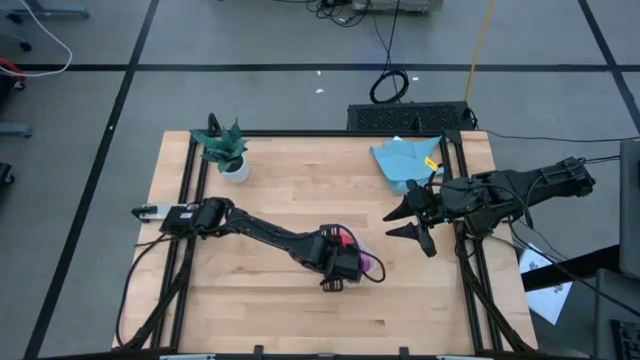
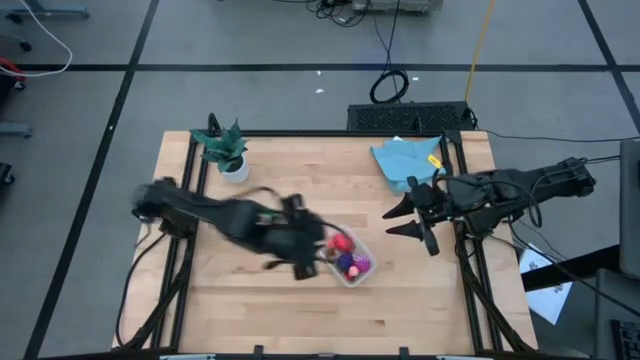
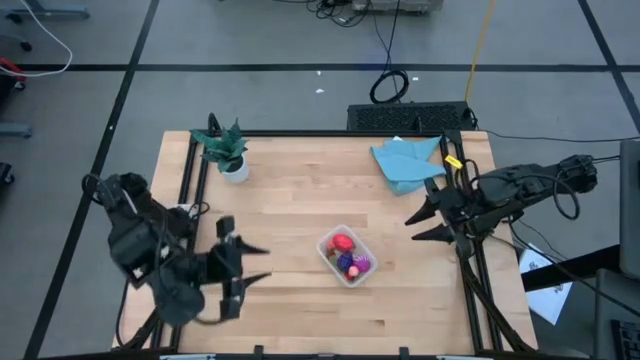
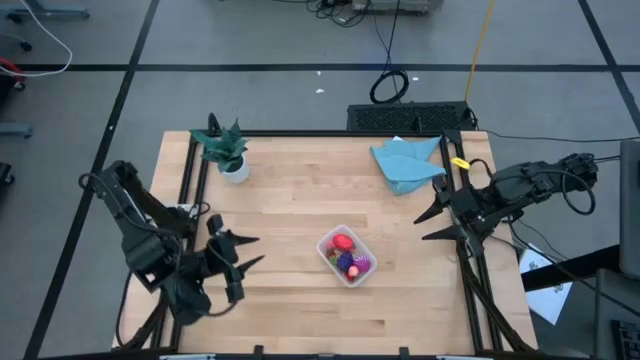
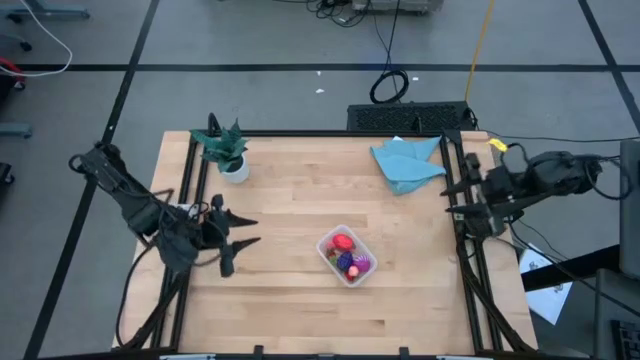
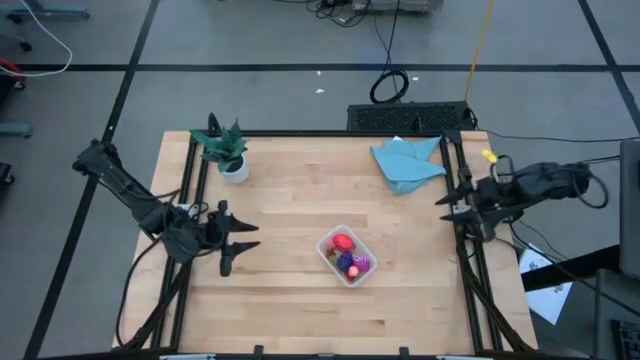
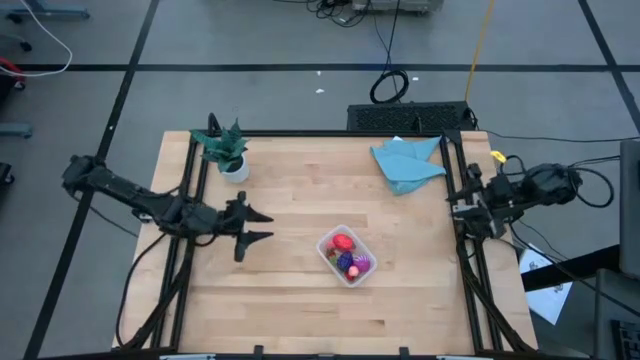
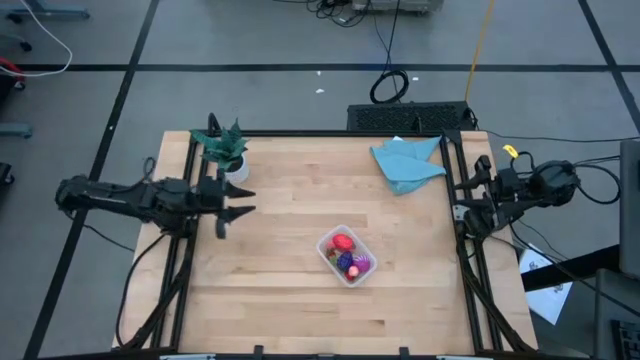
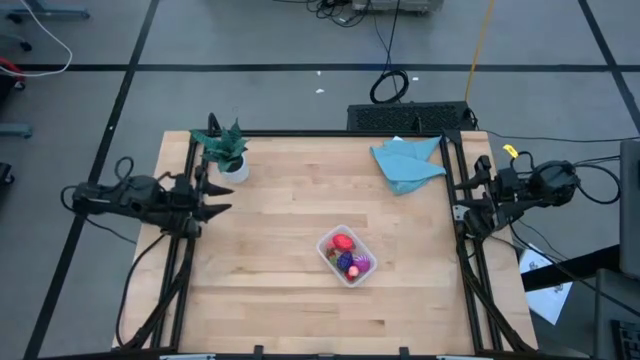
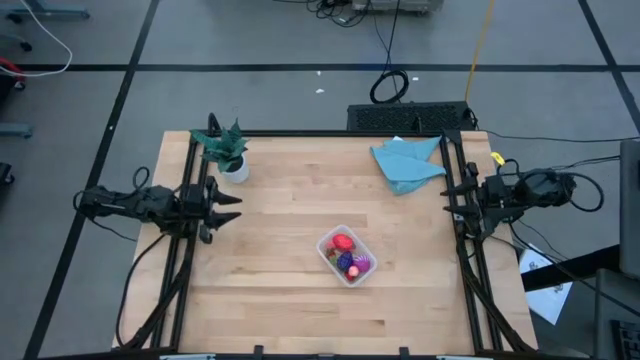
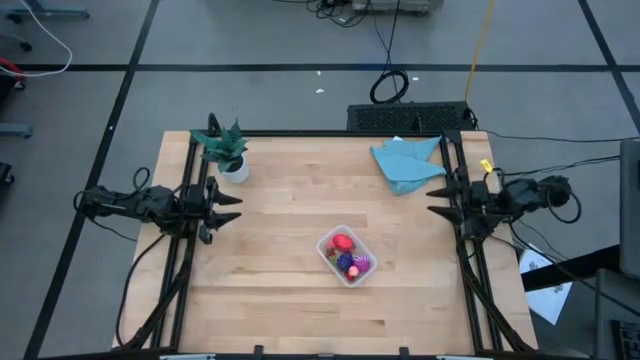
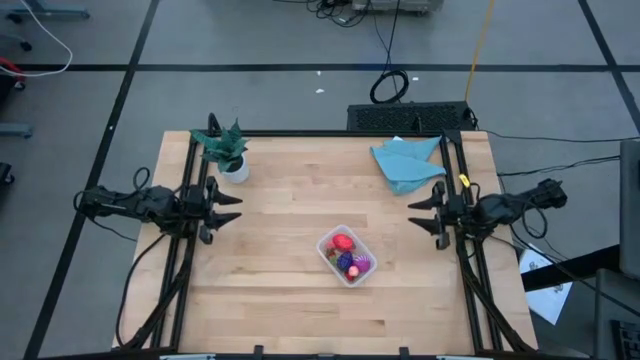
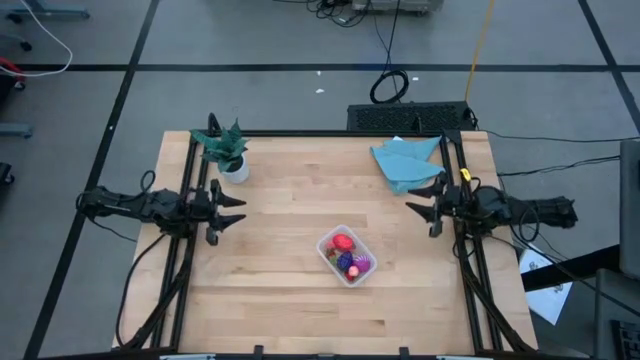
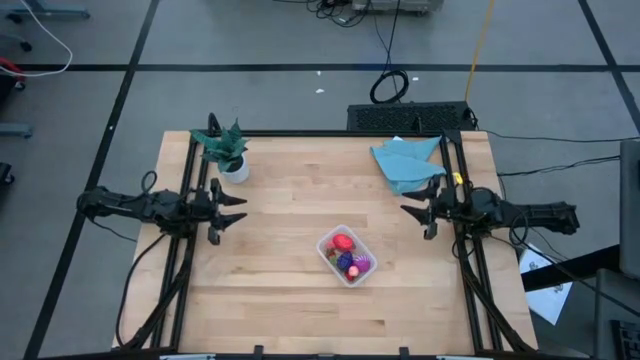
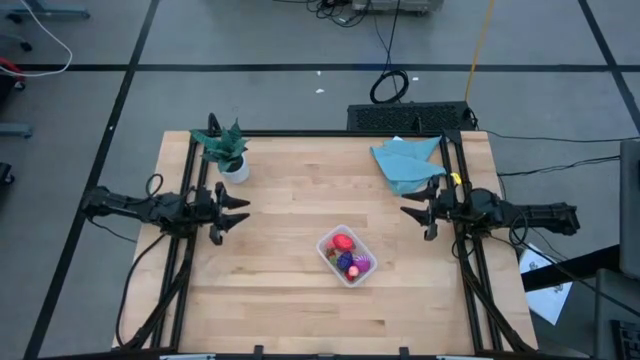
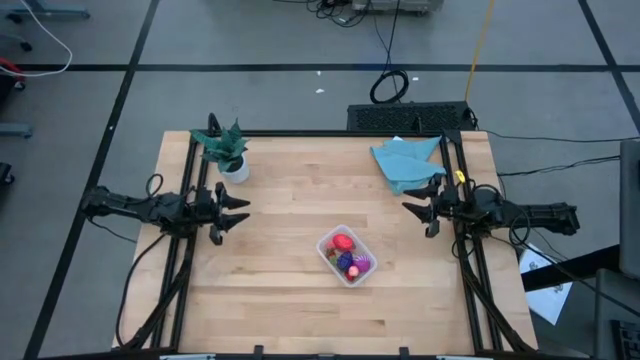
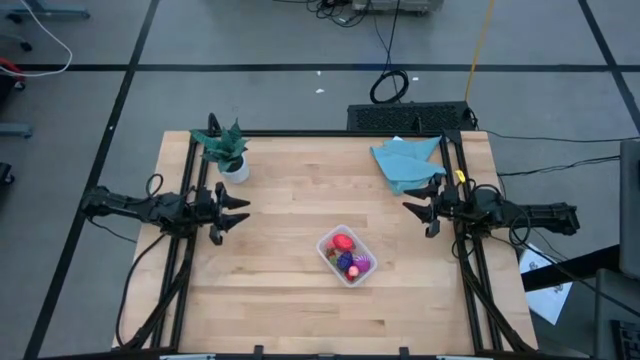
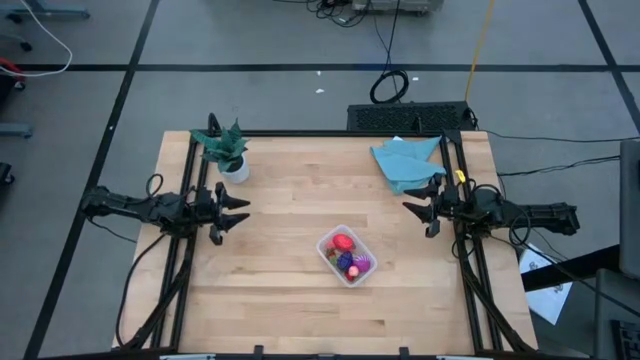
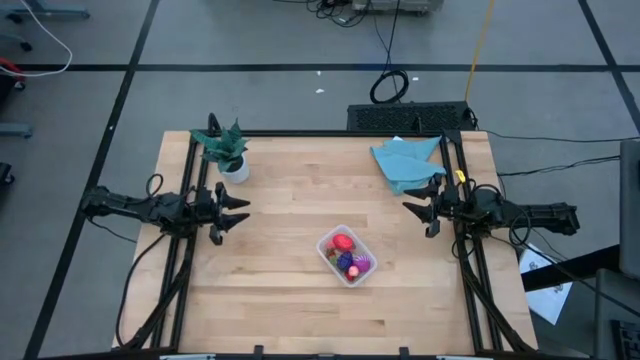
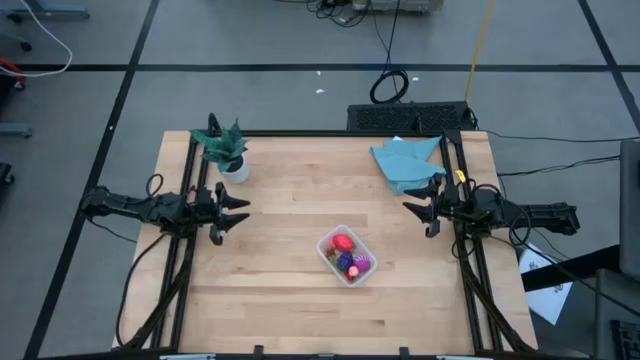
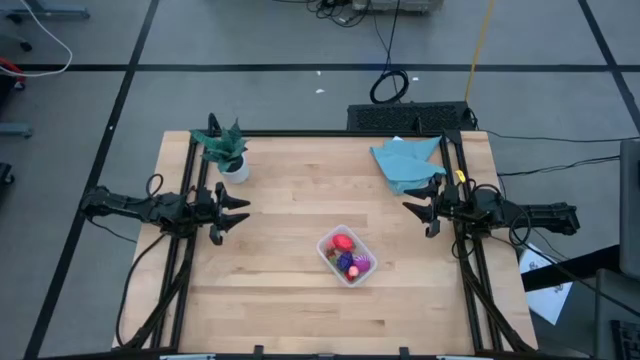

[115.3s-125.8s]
Task: Pick and placing Produce into tupperware
Return to Home Position

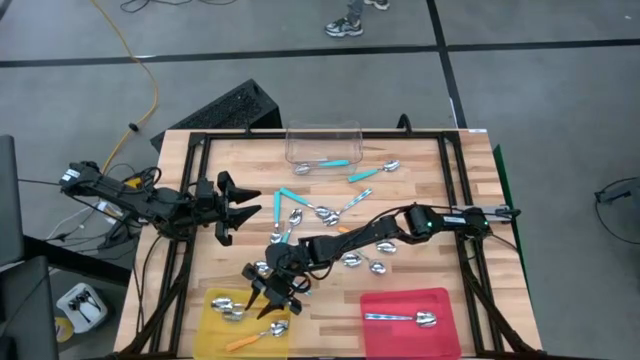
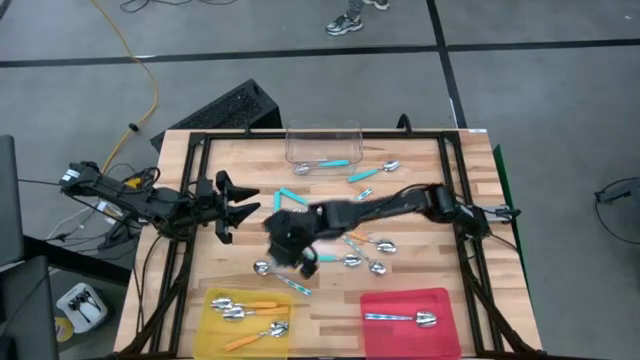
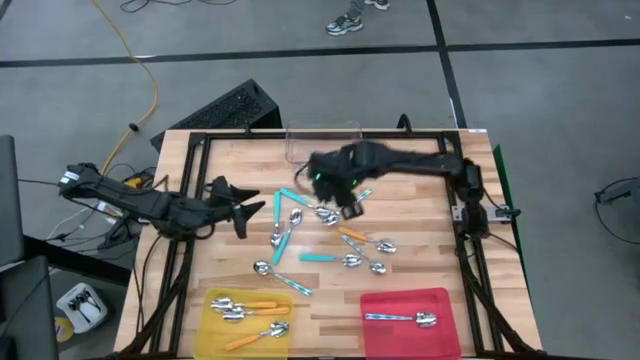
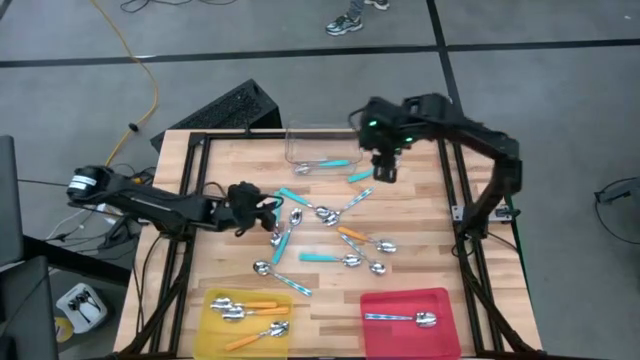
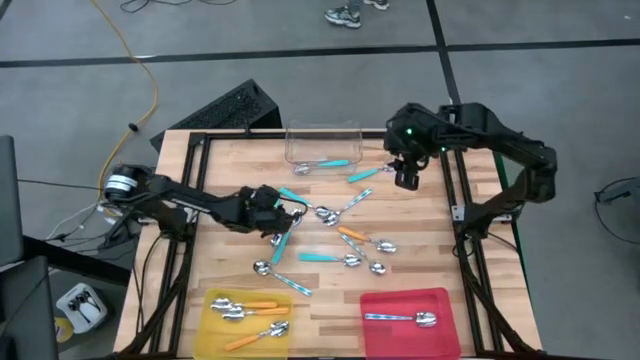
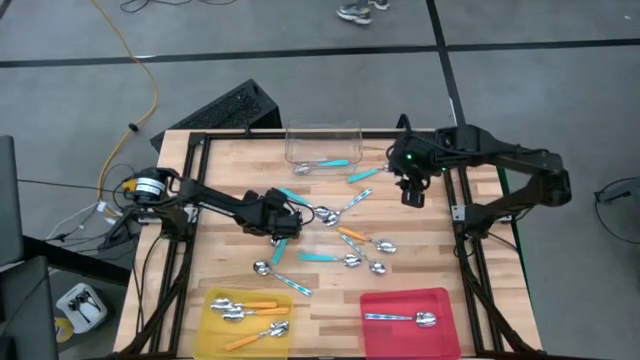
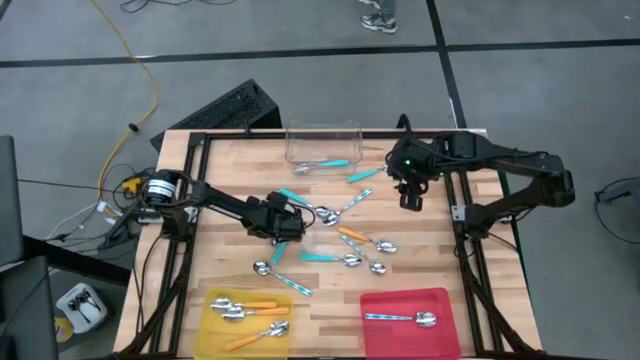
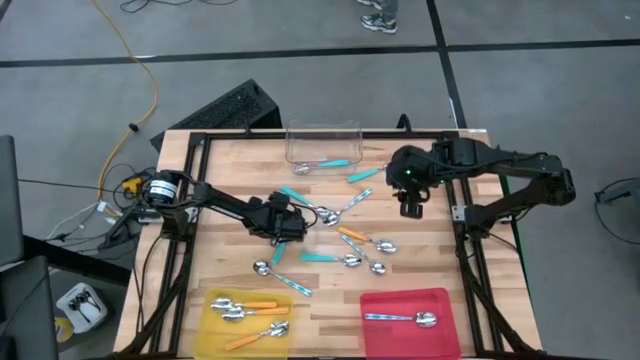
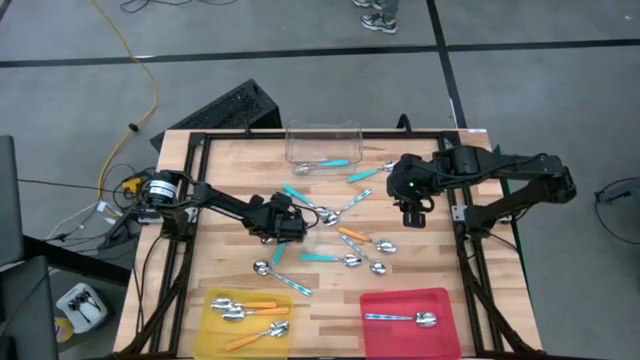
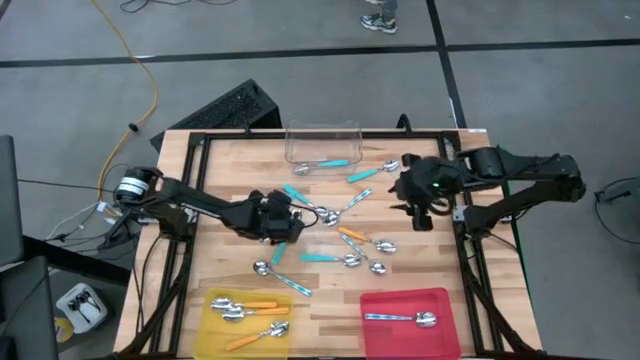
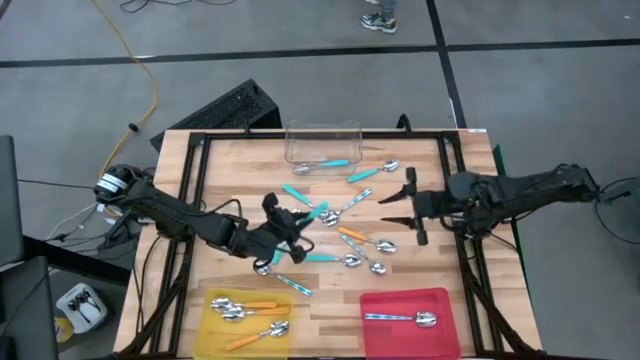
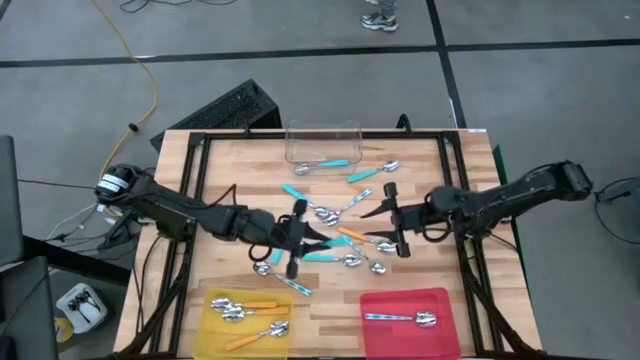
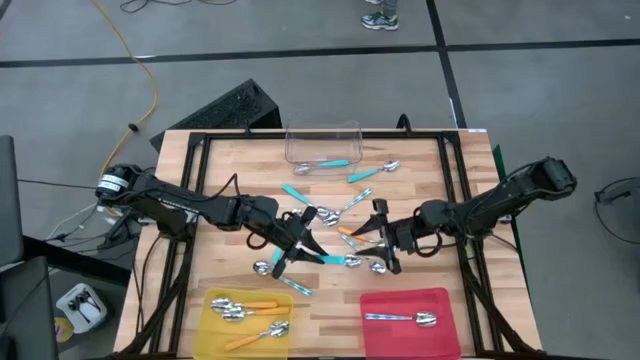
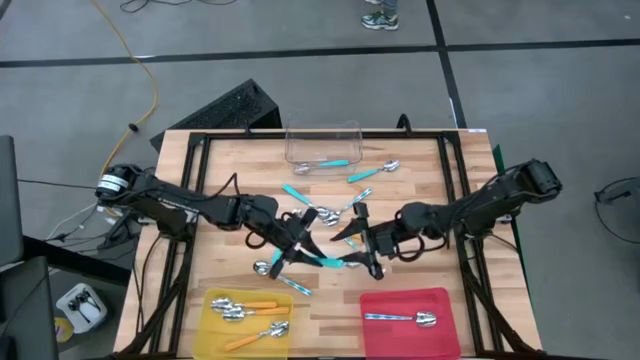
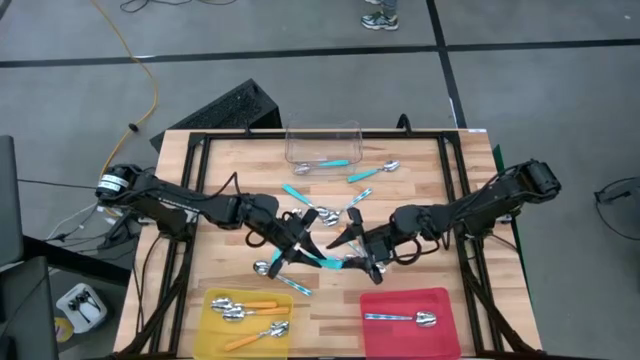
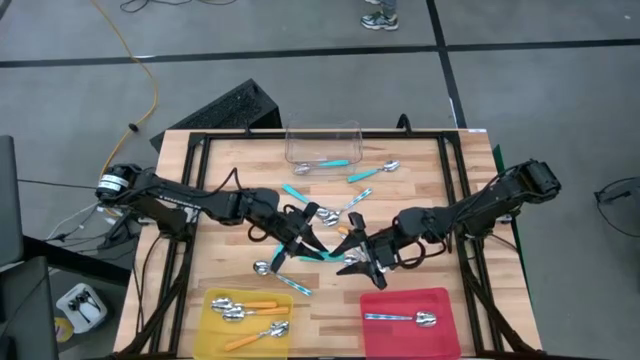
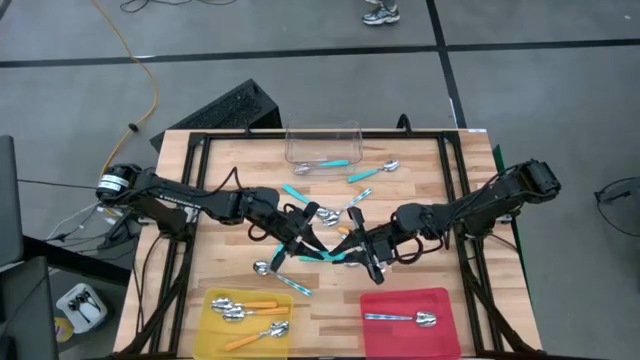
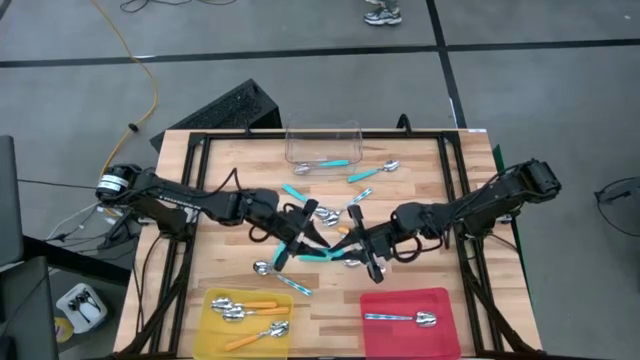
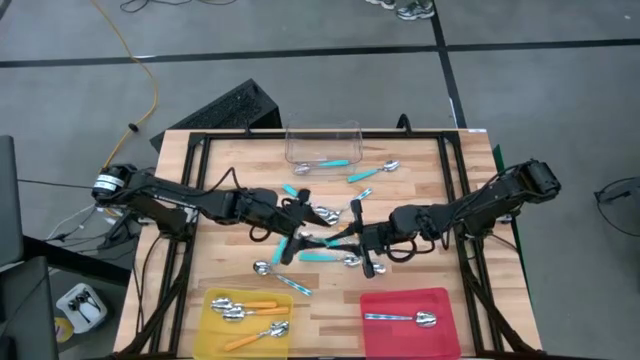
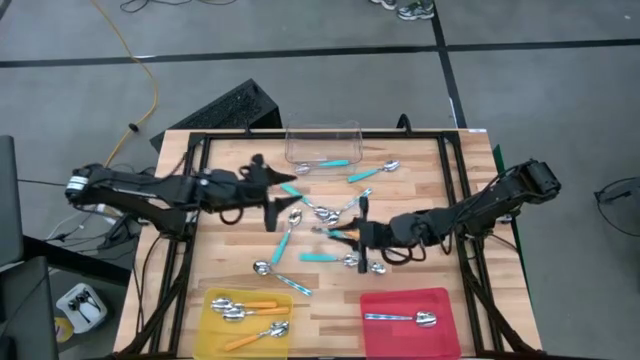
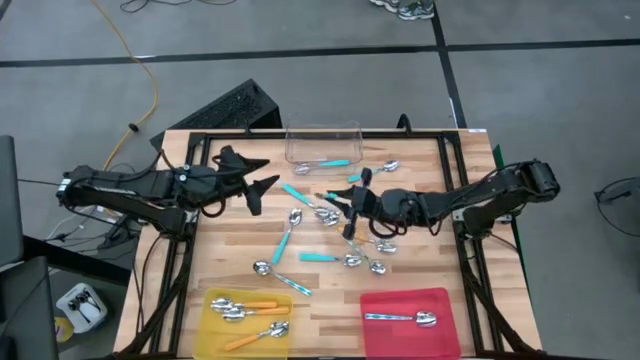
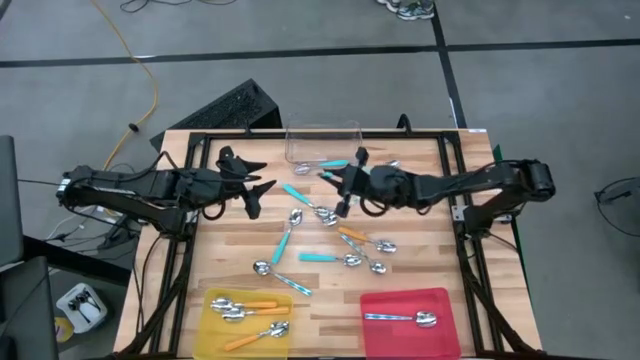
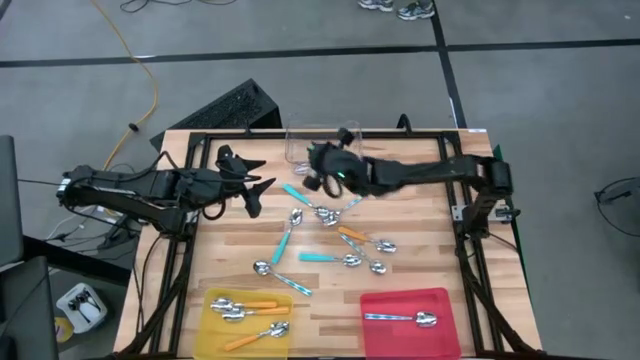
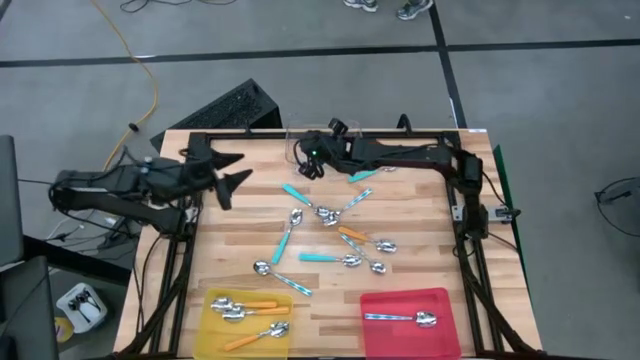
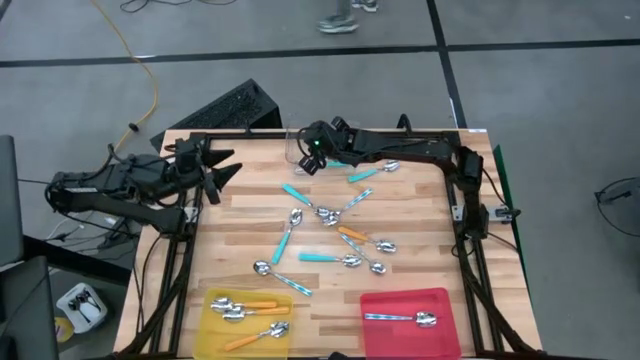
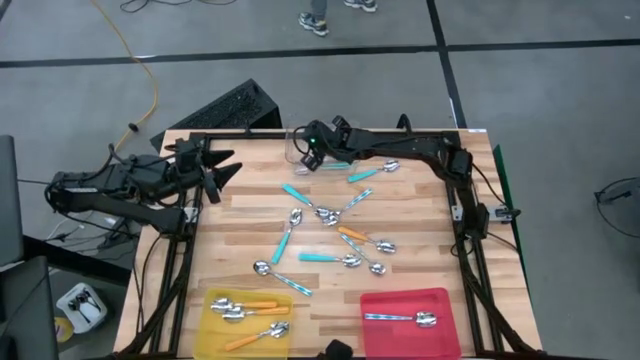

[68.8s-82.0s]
Task: Sort silverware by color (type)
Put the blue spoon into the transparent bin
